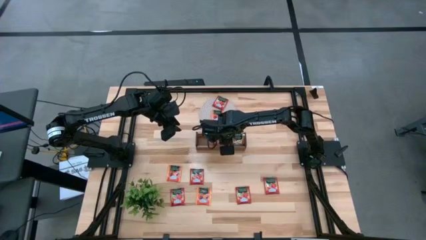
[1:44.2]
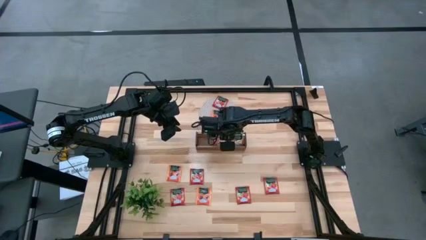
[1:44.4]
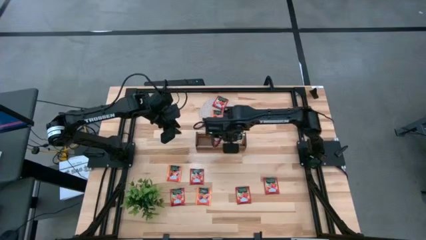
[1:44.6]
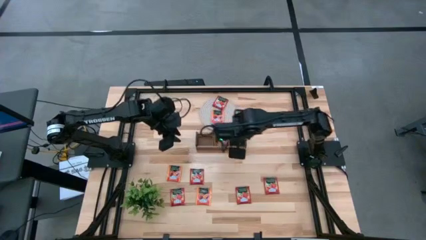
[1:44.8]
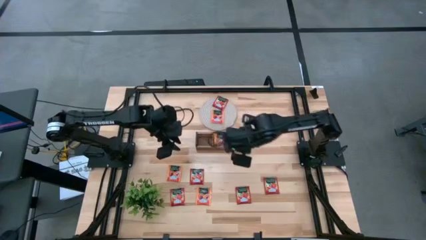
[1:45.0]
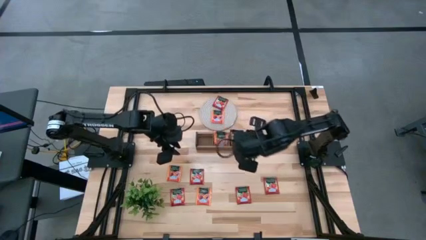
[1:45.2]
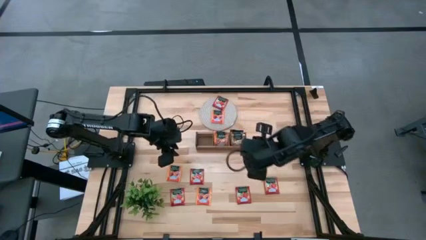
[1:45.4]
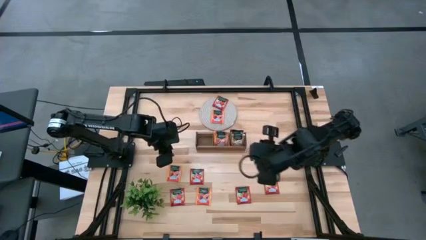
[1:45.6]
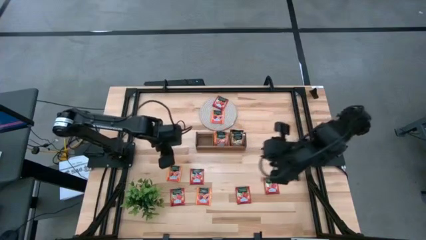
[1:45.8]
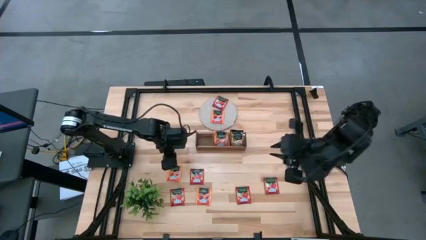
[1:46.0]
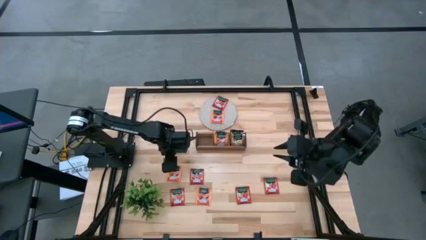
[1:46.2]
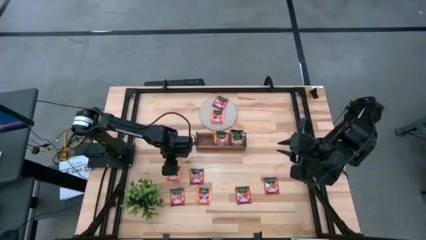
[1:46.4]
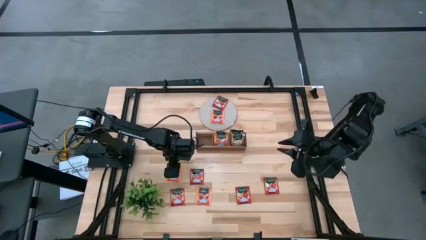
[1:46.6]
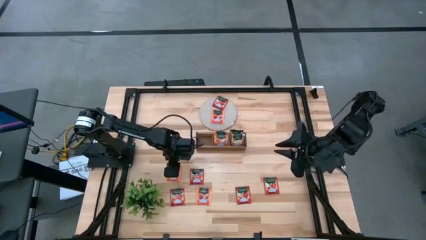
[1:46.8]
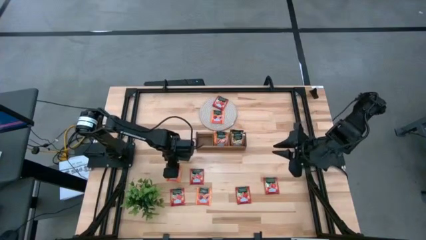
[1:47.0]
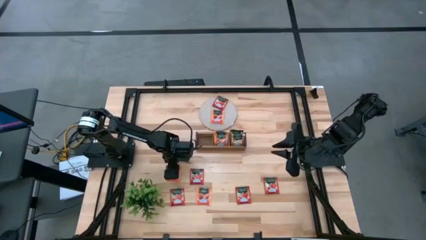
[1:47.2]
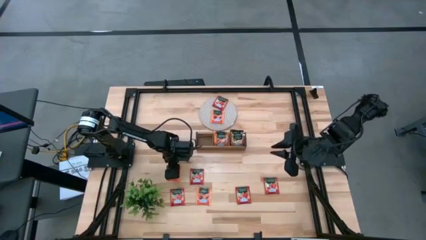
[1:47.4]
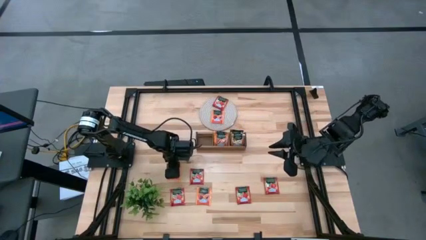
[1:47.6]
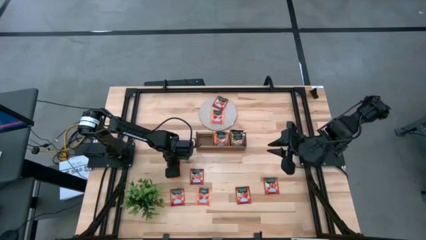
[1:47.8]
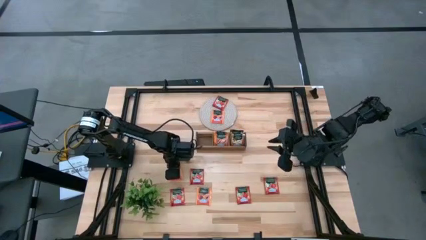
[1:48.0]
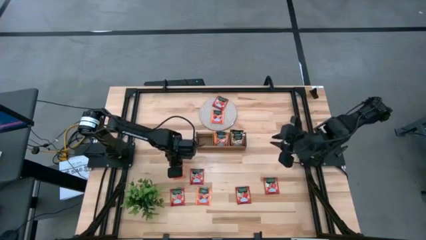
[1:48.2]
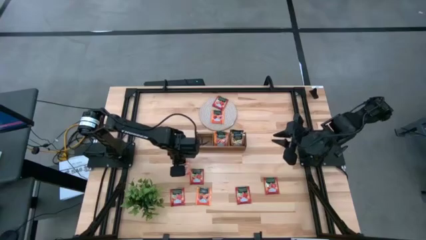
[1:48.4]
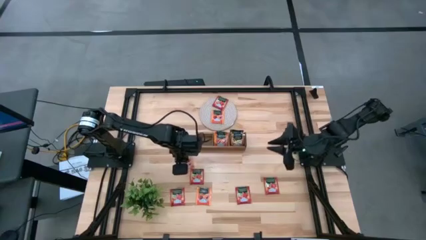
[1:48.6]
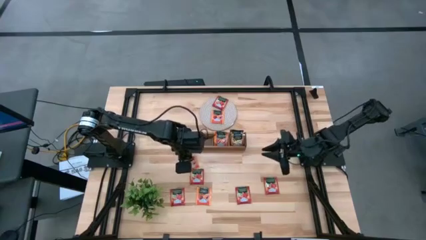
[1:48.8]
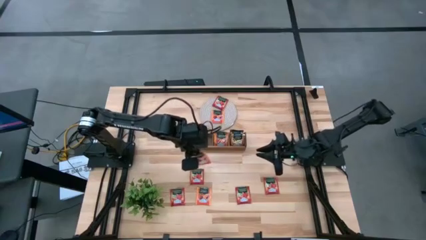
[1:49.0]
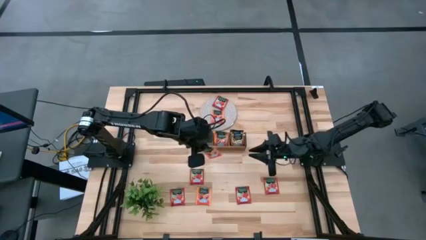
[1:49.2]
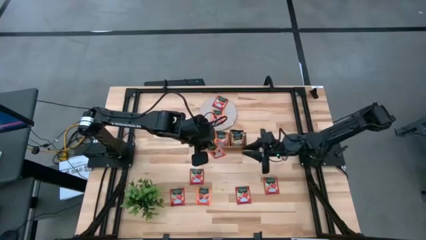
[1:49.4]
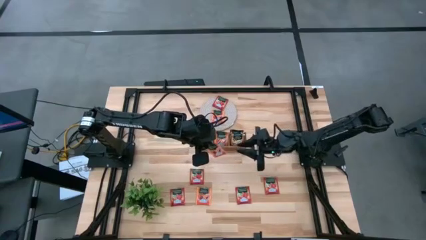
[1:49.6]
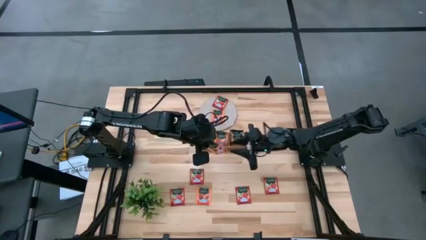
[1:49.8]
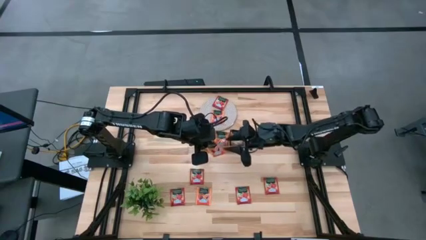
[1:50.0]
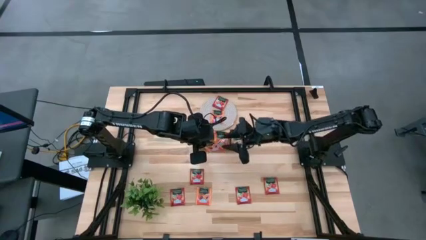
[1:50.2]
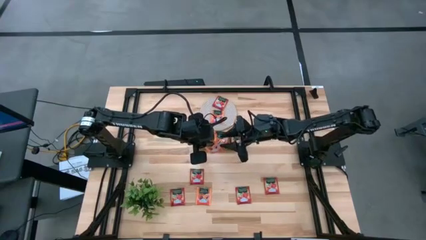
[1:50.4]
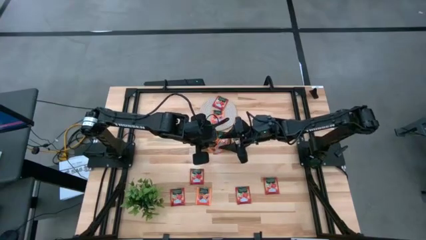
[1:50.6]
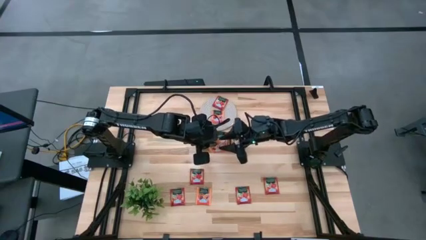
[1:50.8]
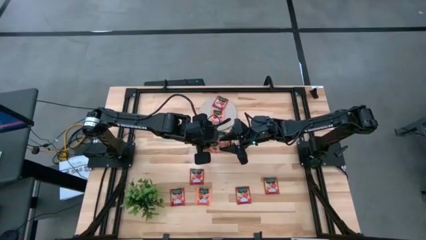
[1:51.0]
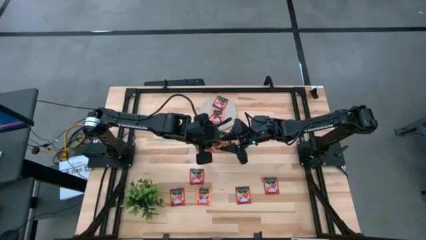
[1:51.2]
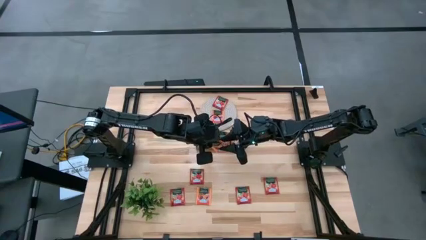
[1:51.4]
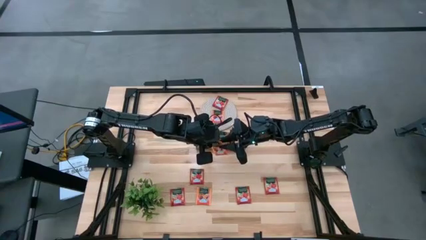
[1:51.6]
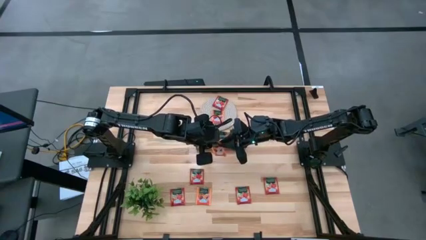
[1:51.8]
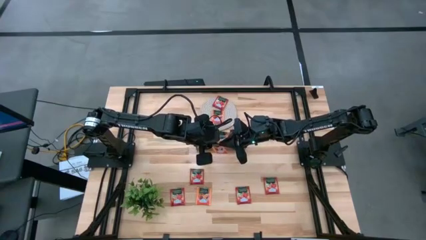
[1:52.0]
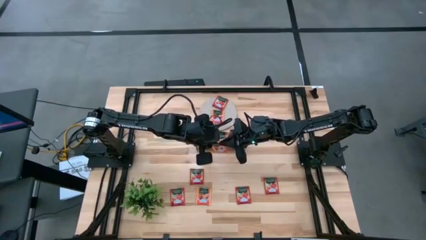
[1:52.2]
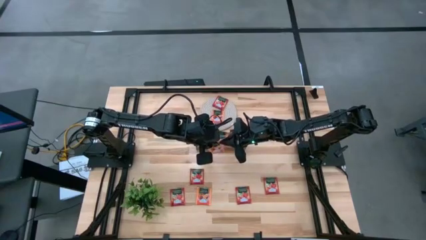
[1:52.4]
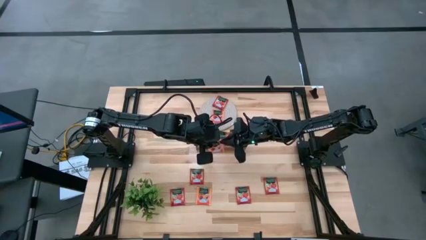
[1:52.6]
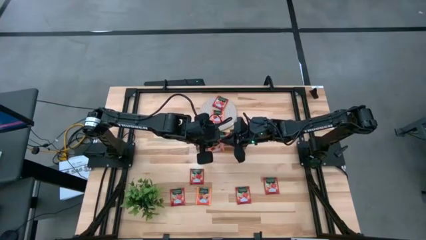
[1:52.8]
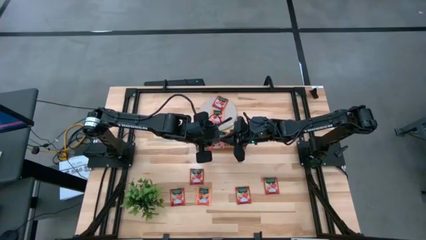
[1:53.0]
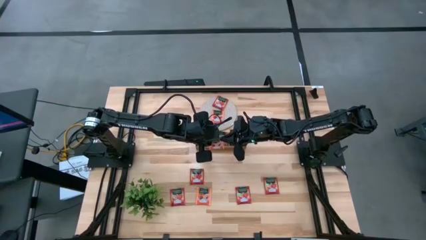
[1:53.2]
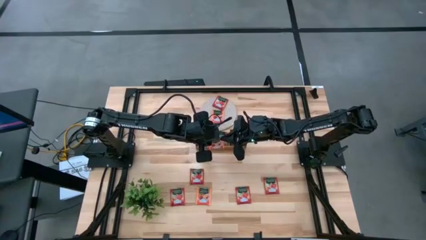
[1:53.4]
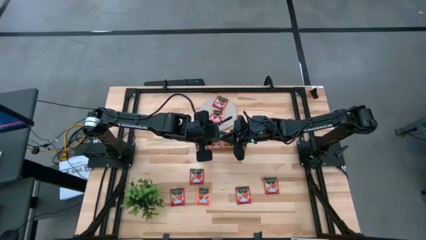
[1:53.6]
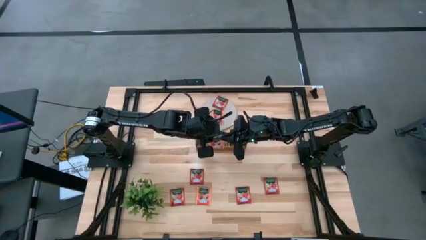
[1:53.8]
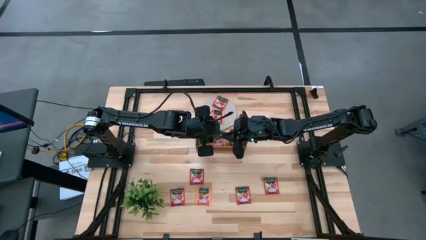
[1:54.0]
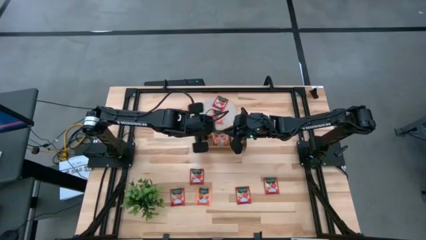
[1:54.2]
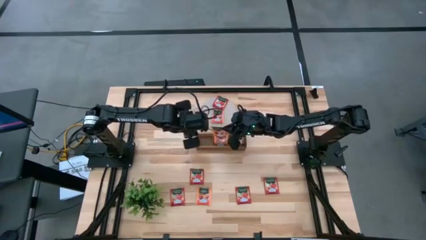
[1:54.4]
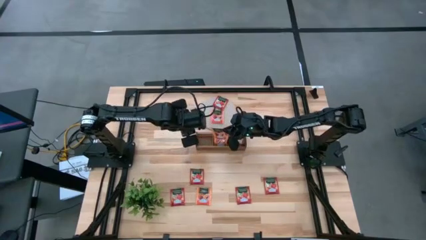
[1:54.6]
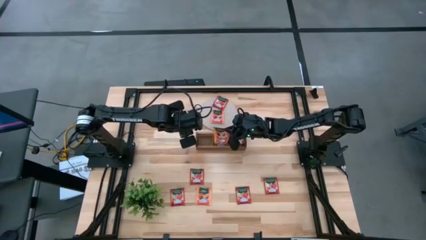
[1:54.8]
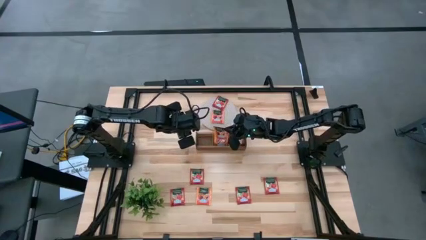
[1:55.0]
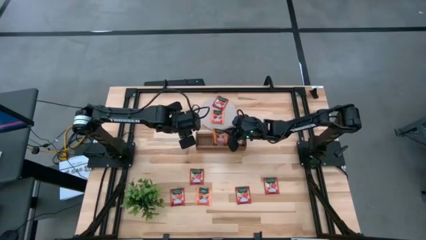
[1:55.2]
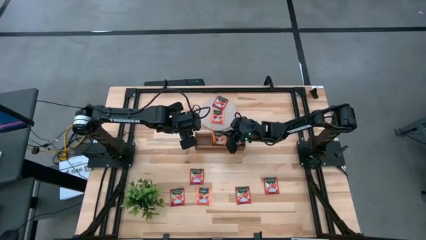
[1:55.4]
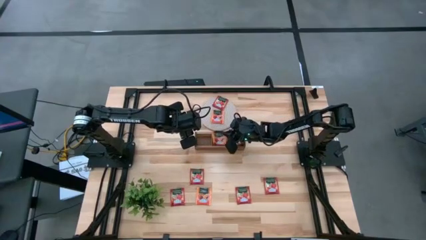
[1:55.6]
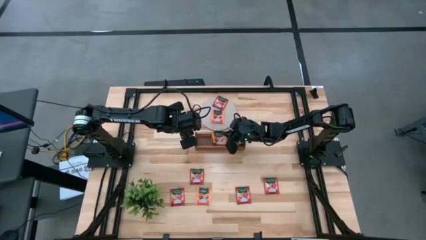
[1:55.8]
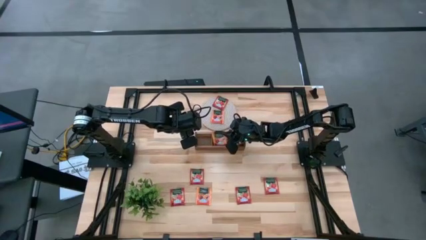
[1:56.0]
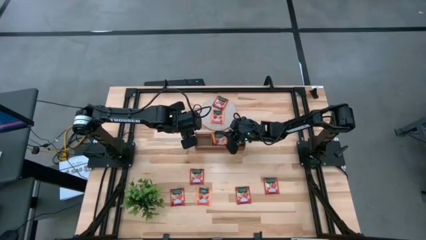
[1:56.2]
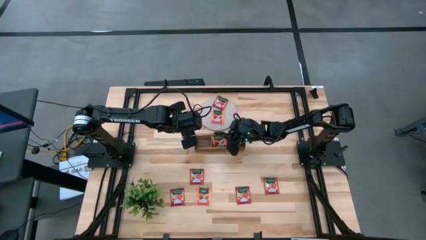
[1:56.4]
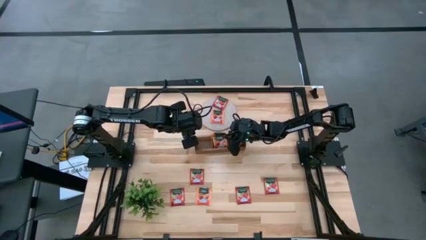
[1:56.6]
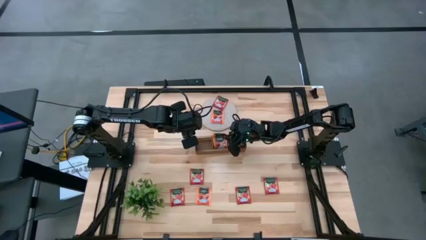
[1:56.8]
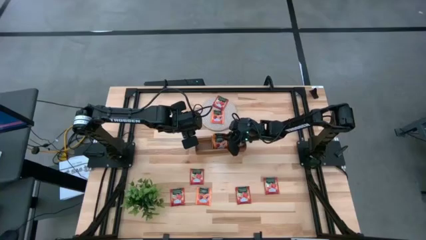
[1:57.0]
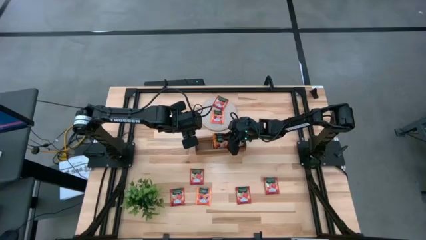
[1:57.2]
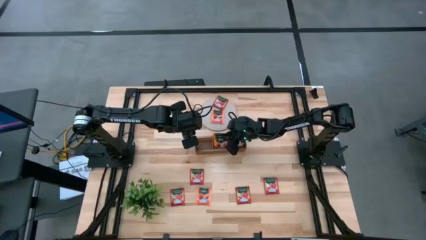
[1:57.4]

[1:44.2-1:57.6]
Task: Pick & Place Tea
Put the orange tea bag into the middle section of the wooden organizer
